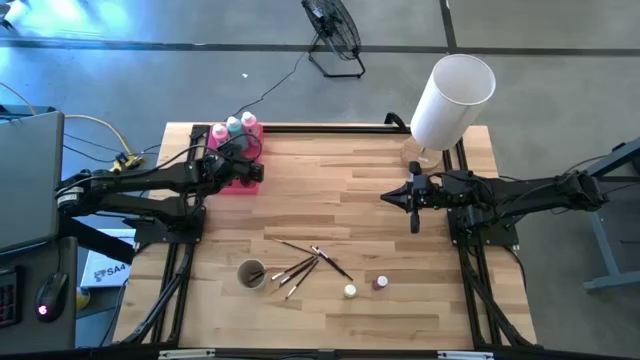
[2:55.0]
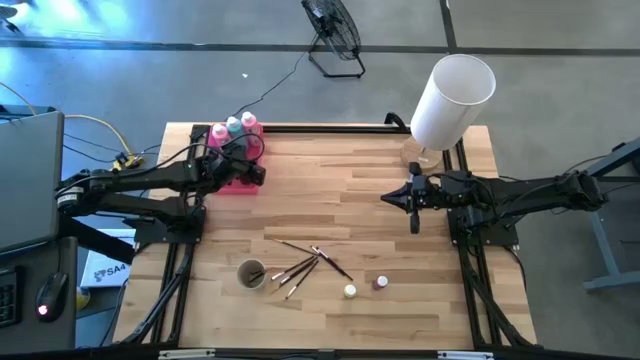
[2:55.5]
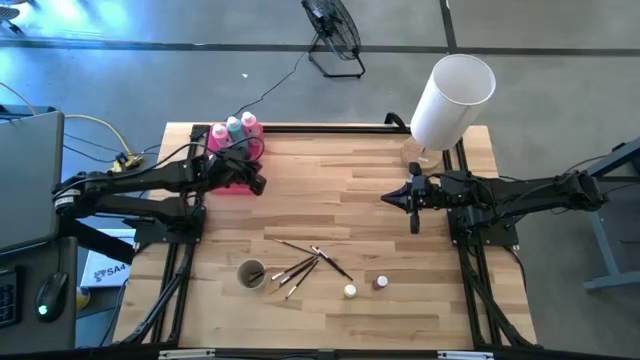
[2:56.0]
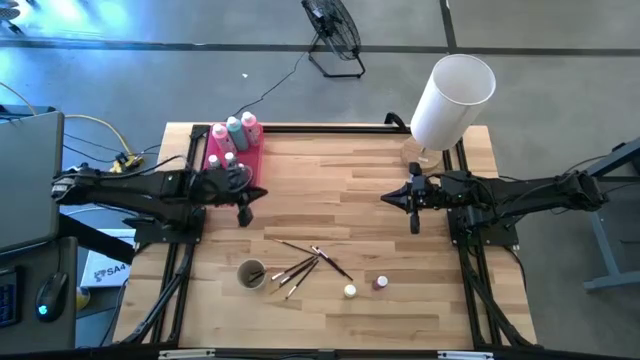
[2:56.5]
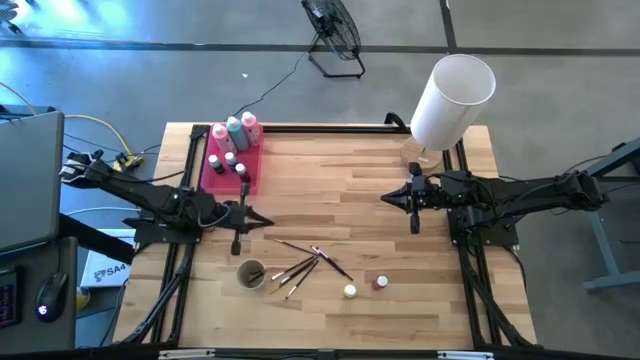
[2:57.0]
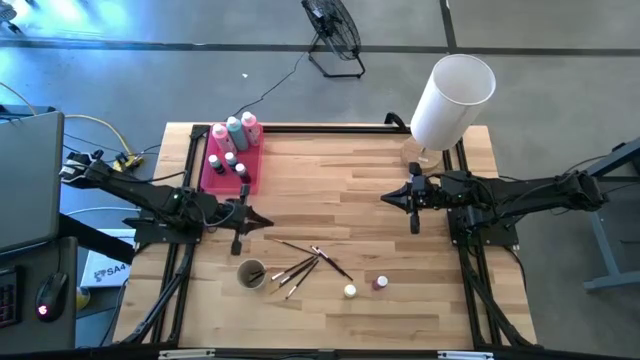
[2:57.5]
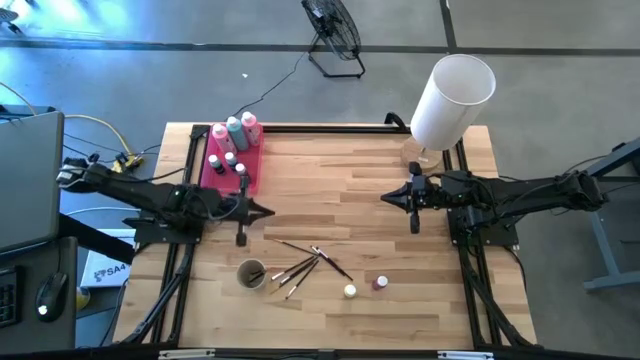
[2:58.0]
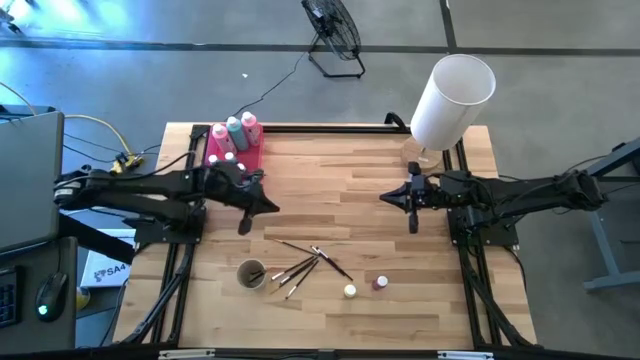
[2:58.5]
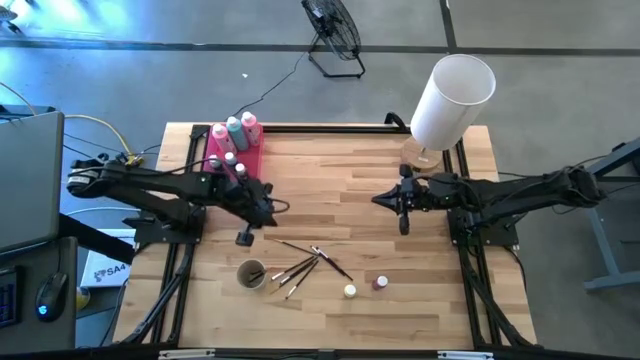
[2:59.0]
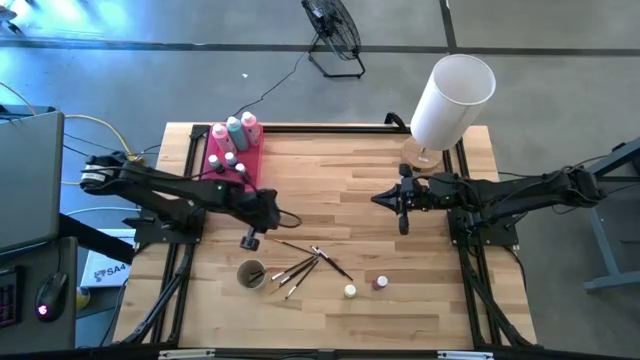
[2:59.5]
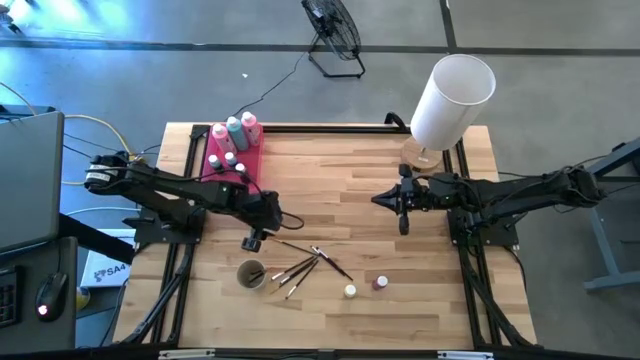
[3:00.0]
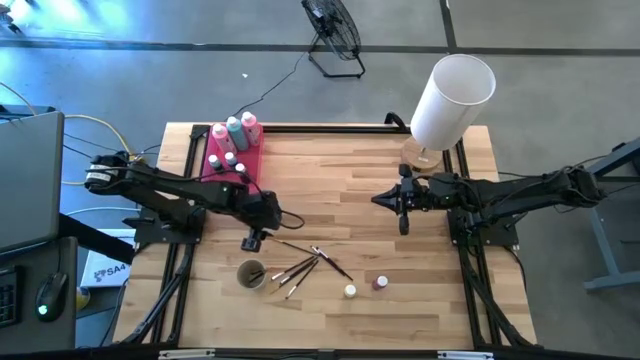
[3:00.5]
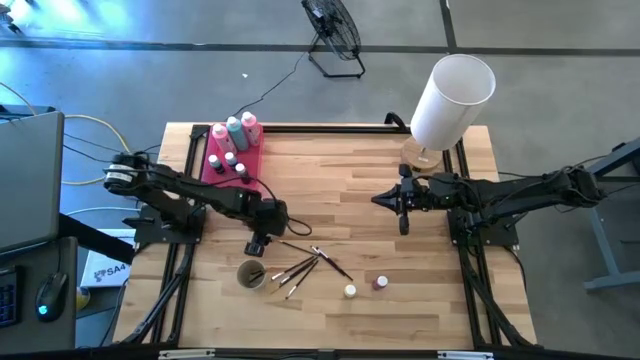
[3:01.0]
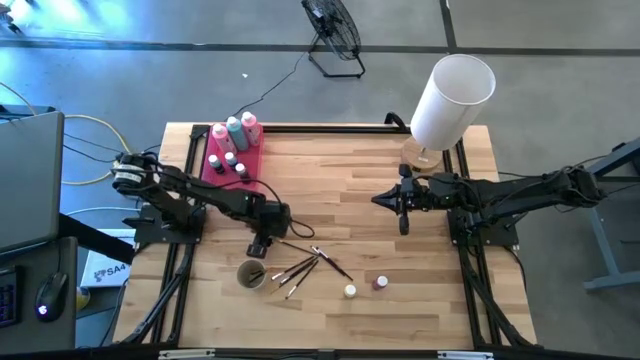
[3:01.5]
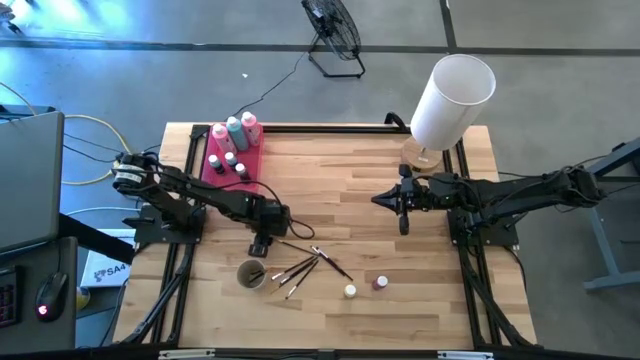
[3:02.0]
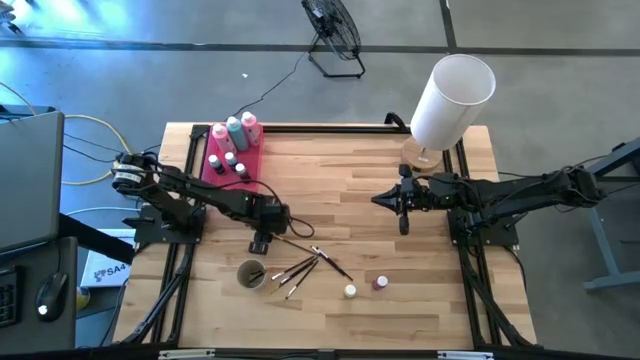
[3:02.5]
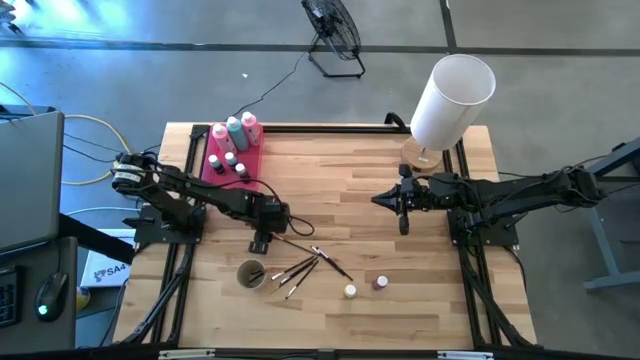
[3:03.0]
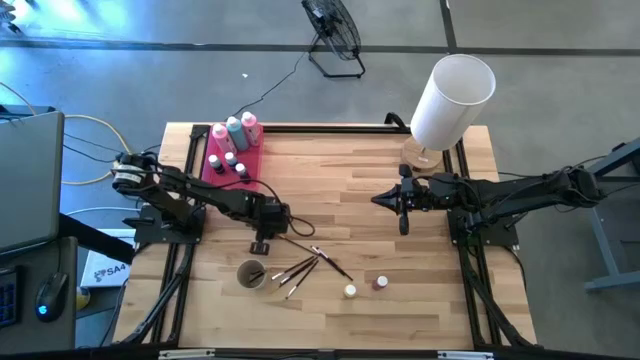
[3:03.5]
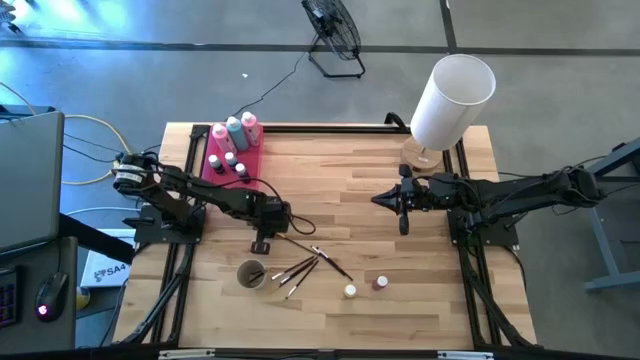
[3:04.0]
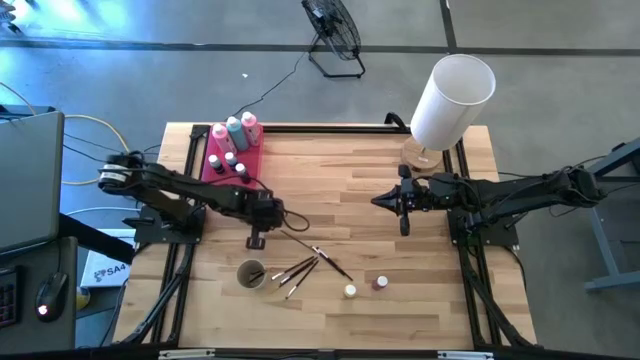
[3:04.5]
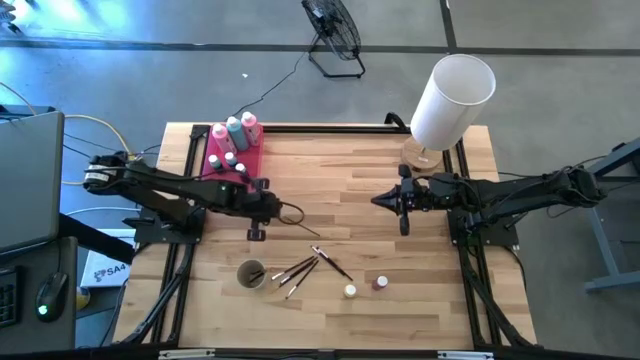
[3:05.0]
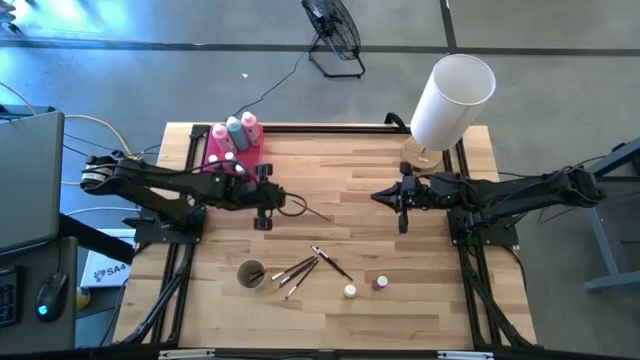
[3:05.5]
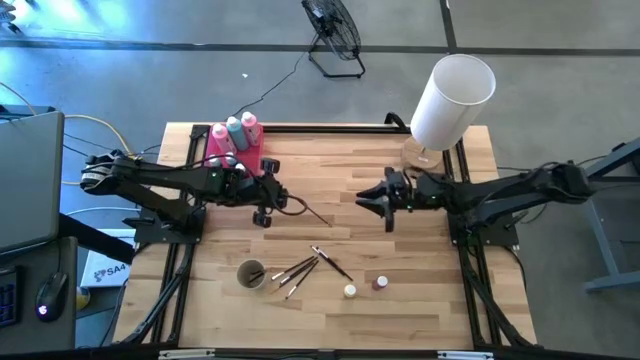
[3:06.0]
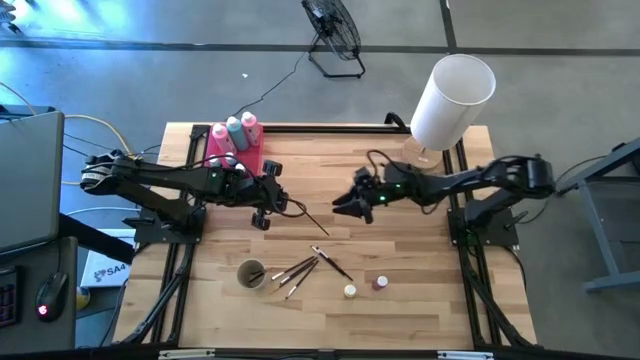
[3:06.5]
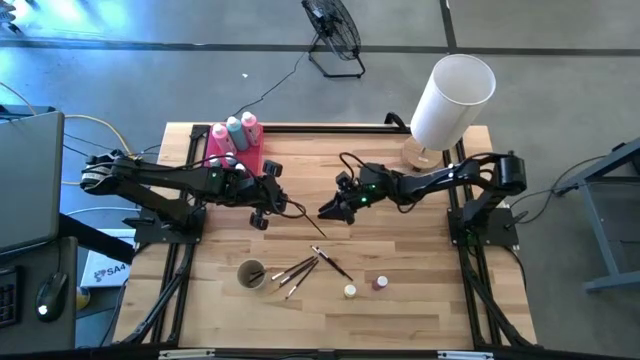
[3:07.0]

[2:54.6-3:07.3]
Task: Pick & Place Paint Supplies
Put the gold paintbrush into the light brown cup

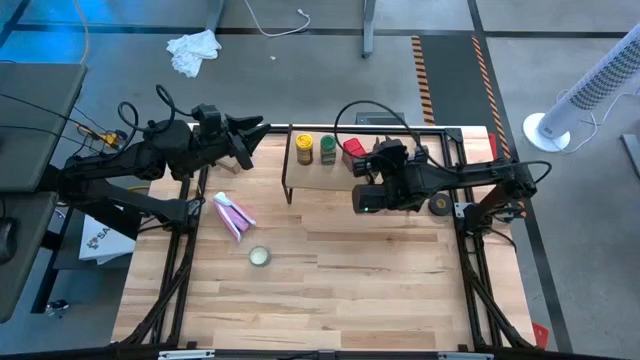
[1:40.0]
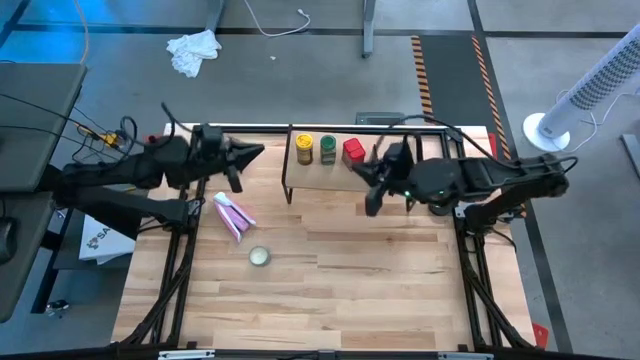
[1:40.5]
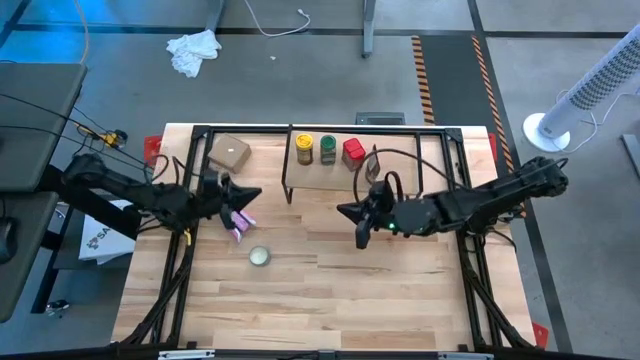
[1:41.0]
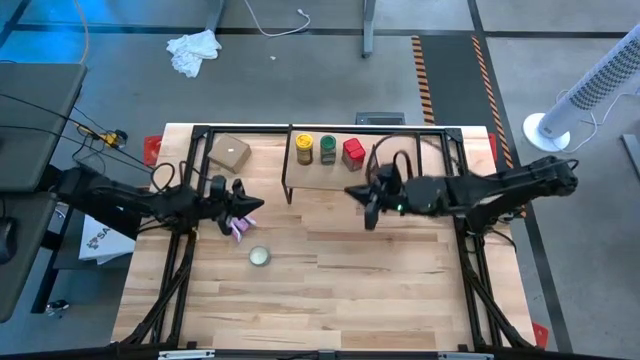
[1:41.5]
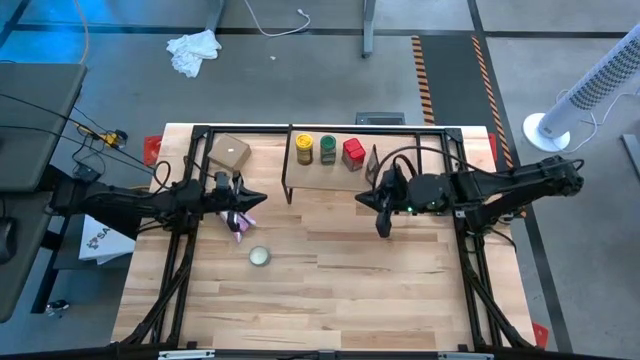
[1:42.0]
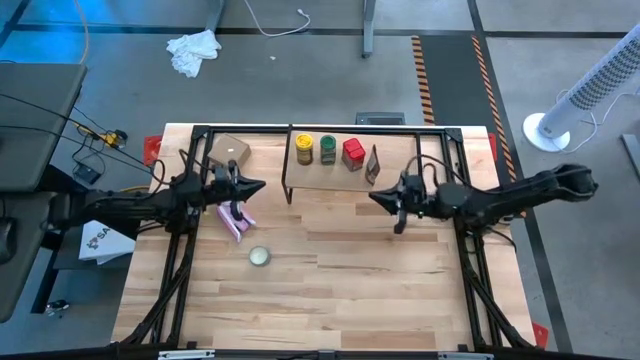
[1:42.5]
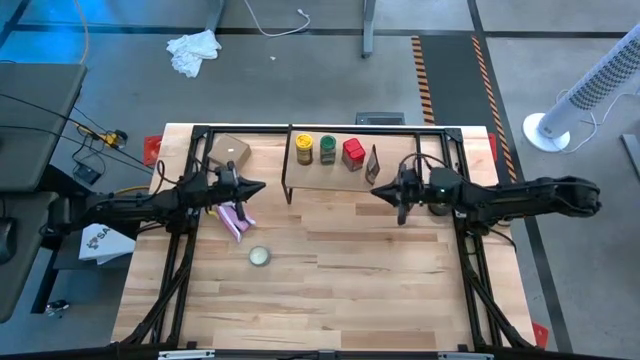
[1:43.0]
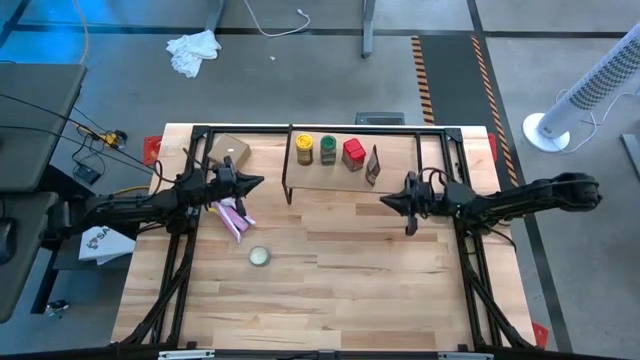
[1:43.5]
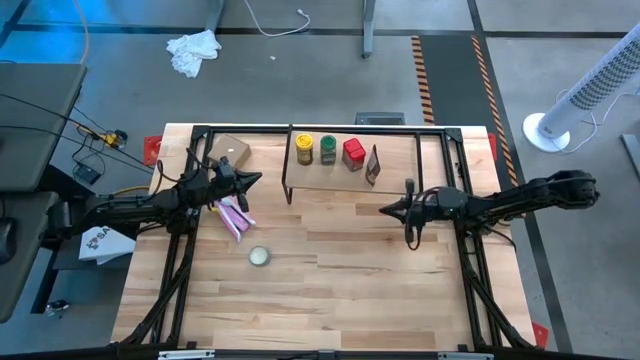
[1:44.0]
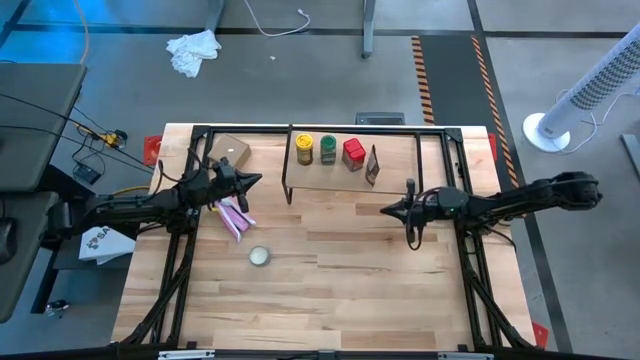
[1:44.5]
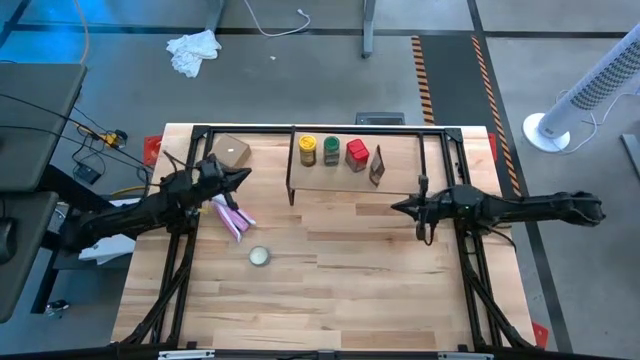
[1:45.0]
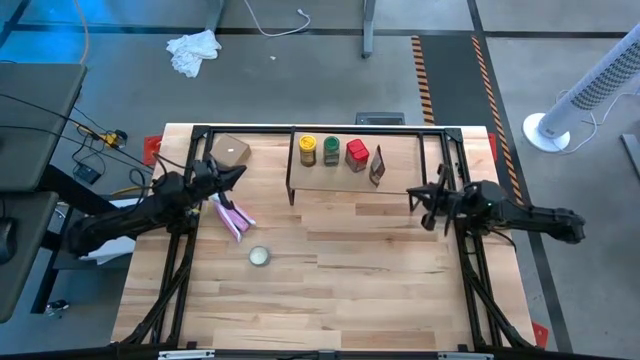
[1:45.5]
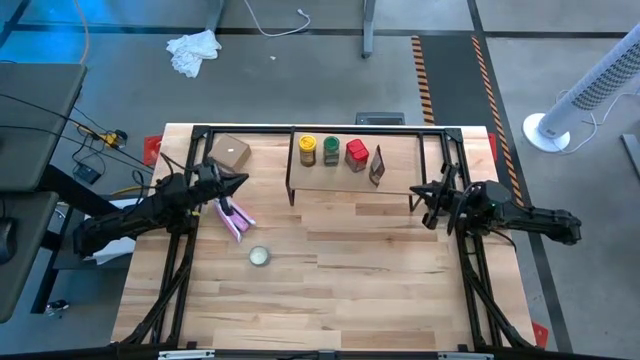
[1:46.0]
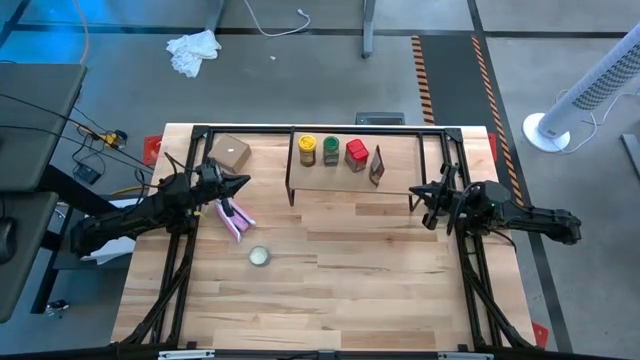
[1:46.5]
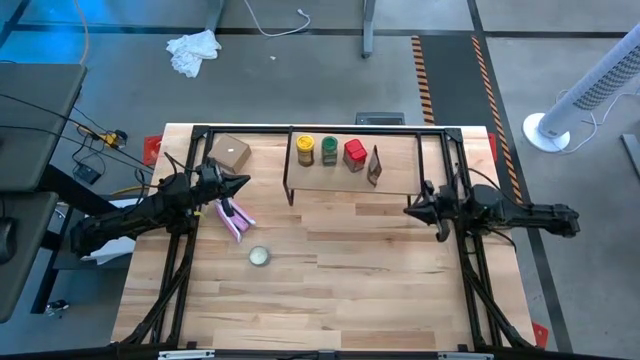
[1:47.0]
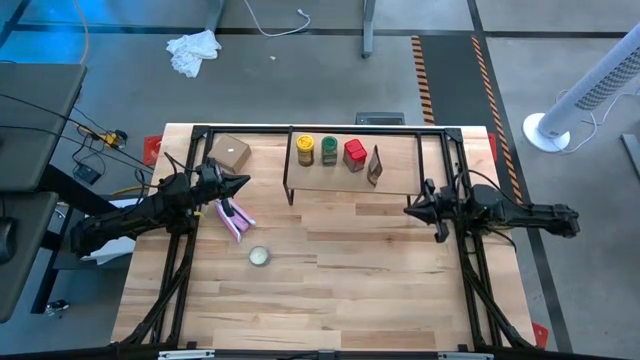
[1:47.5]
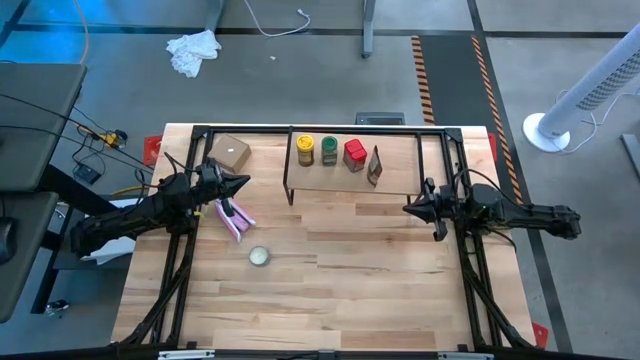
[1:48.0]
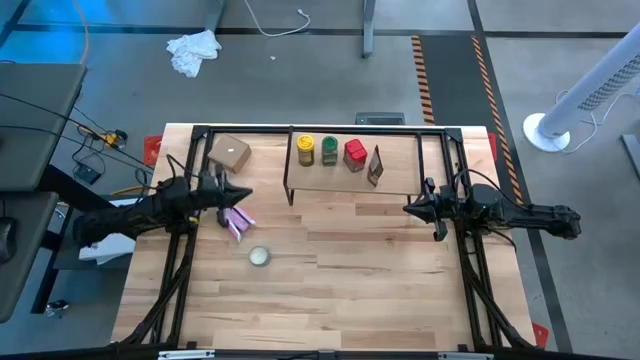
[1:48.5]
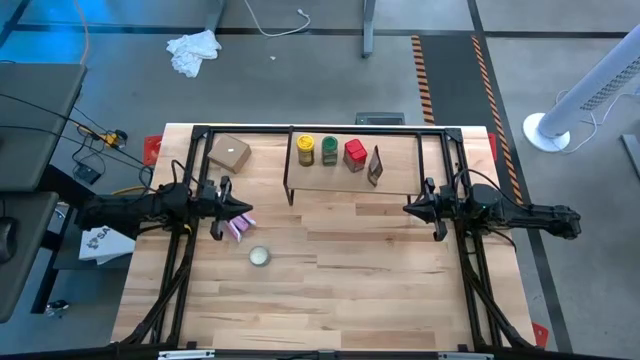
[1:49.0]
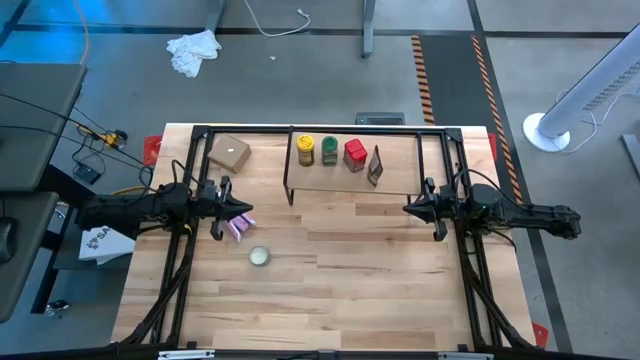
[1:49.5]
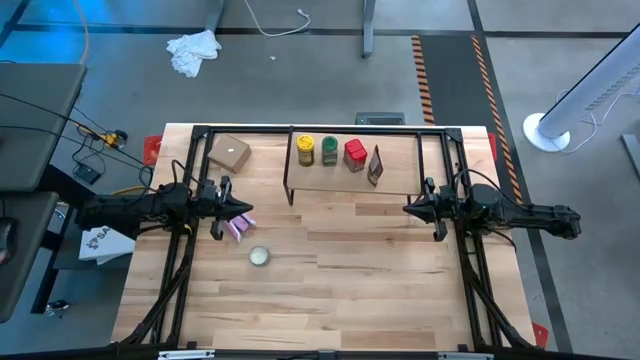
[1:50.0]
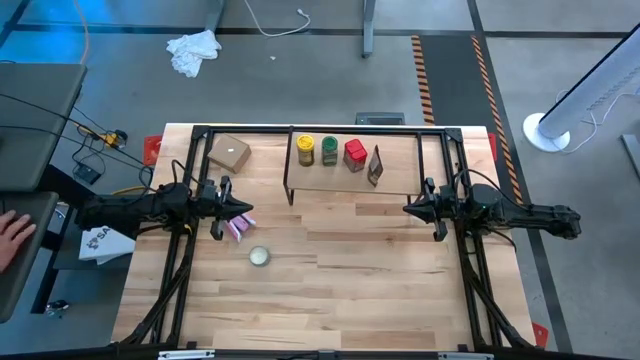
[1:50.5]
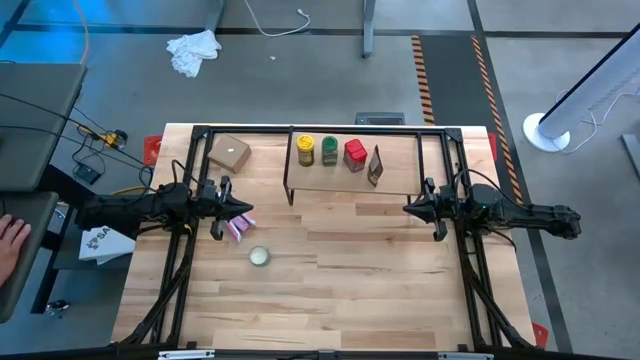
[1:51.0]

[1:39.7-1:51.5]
Task: Shelf spices
Return to Home Position
